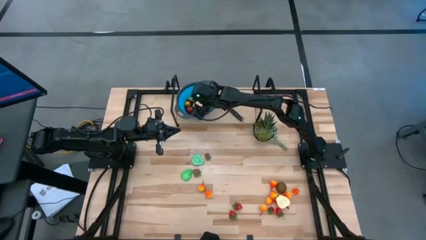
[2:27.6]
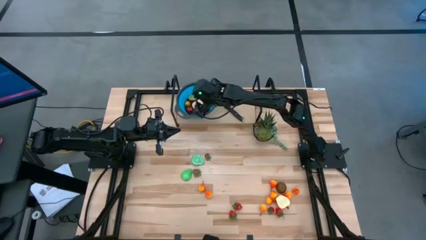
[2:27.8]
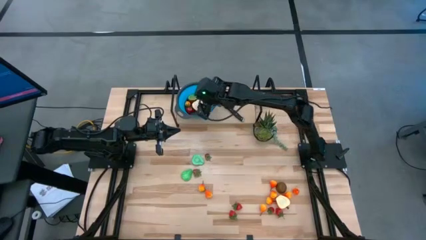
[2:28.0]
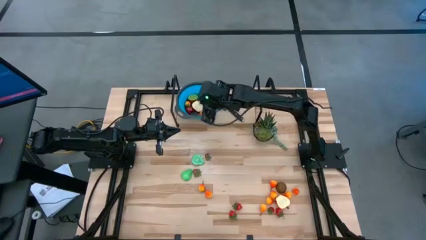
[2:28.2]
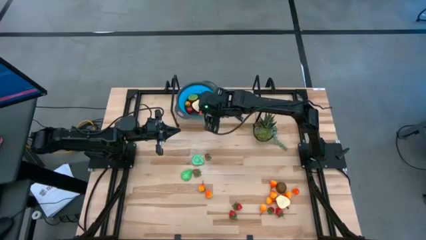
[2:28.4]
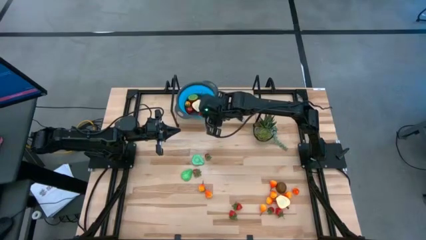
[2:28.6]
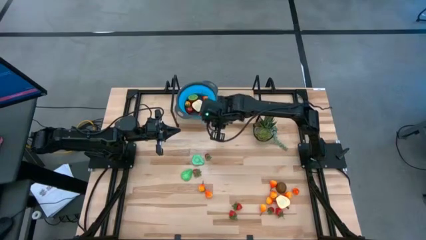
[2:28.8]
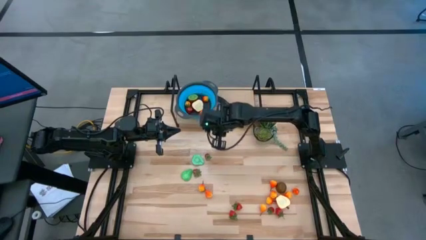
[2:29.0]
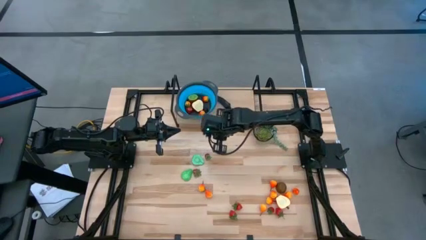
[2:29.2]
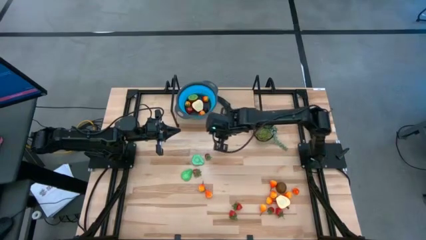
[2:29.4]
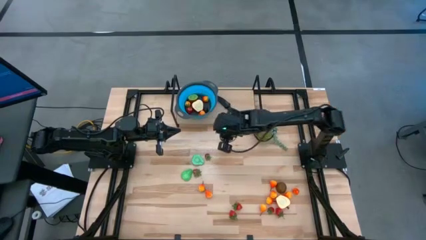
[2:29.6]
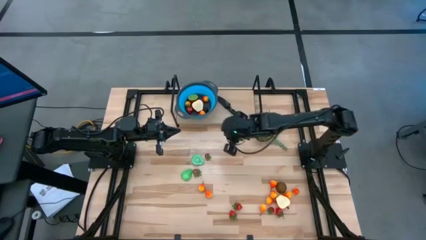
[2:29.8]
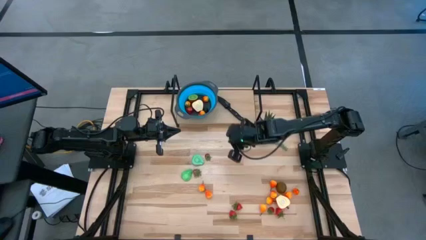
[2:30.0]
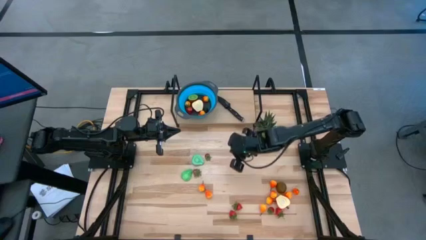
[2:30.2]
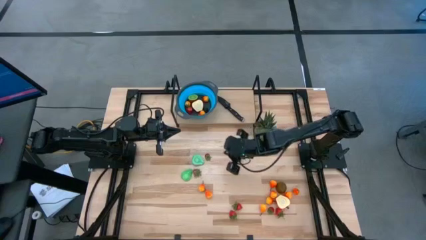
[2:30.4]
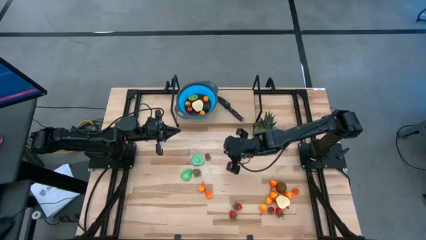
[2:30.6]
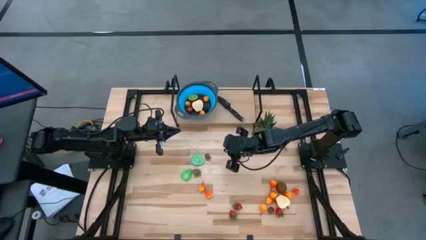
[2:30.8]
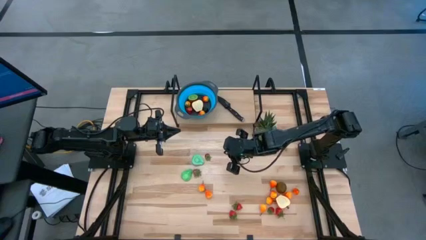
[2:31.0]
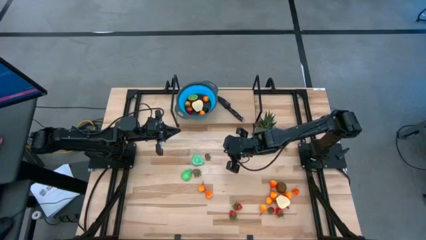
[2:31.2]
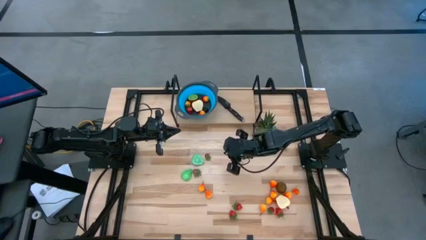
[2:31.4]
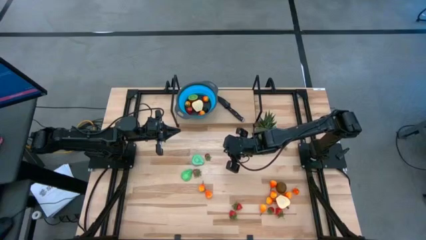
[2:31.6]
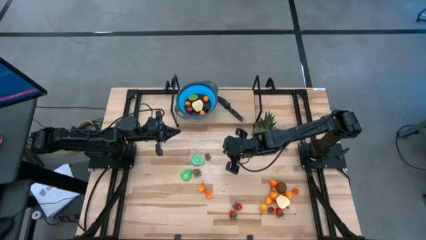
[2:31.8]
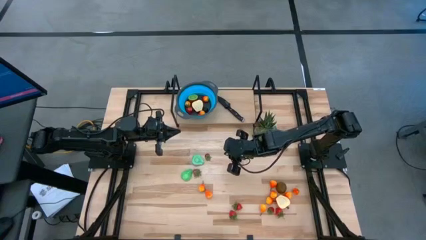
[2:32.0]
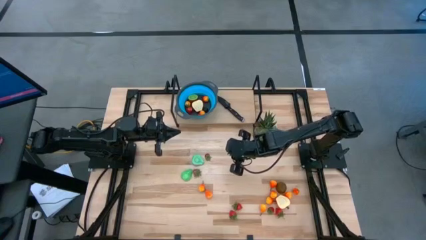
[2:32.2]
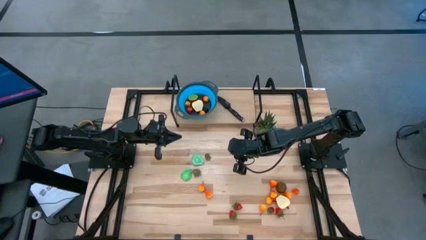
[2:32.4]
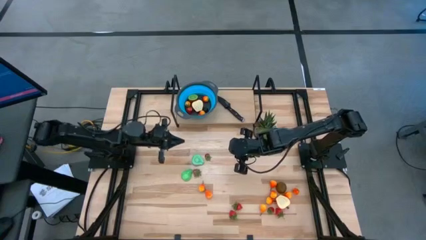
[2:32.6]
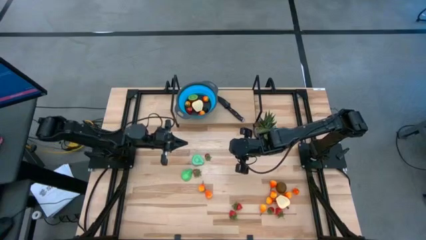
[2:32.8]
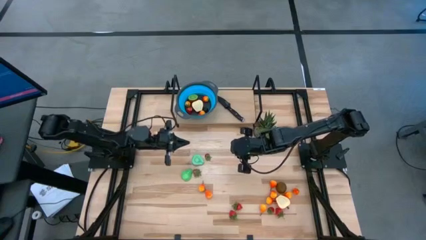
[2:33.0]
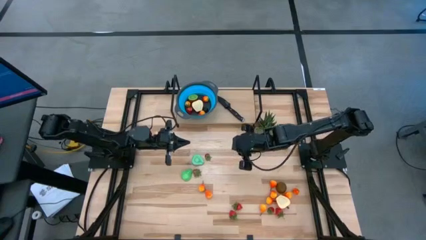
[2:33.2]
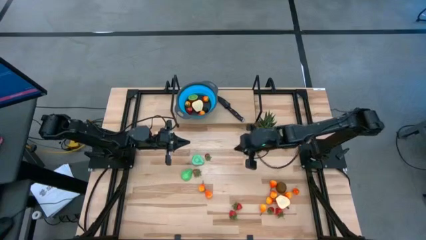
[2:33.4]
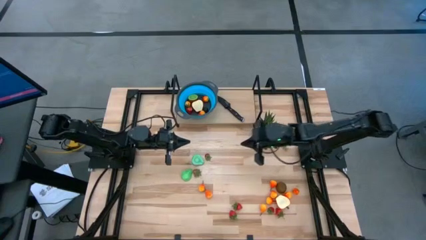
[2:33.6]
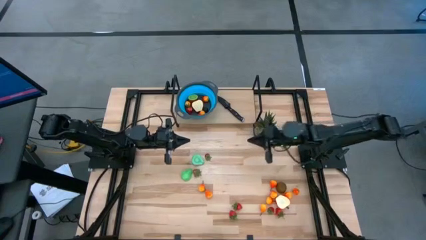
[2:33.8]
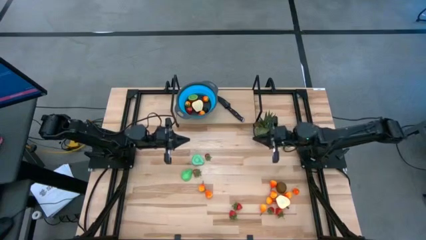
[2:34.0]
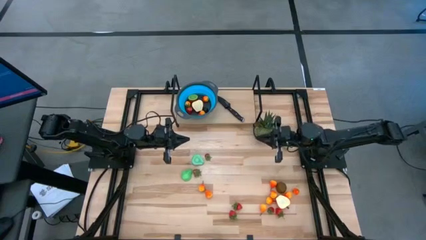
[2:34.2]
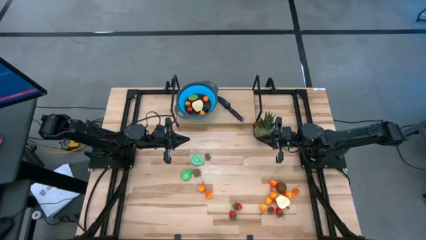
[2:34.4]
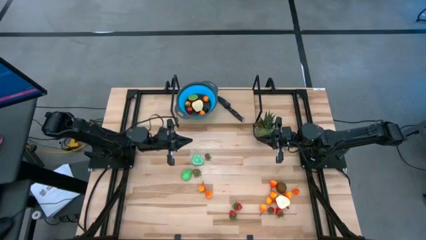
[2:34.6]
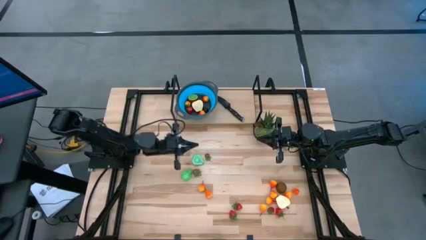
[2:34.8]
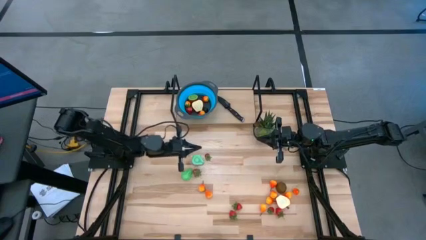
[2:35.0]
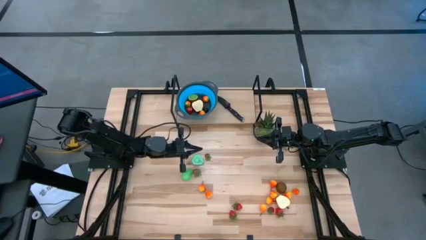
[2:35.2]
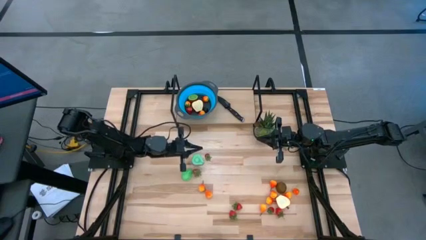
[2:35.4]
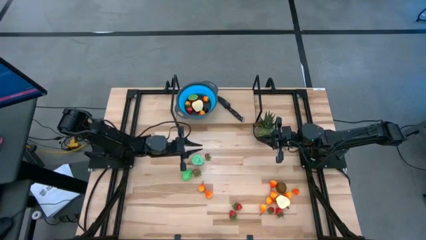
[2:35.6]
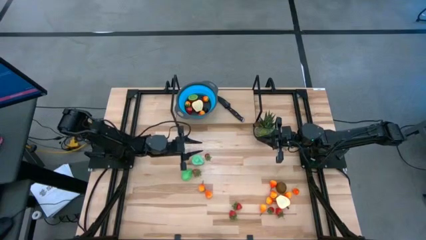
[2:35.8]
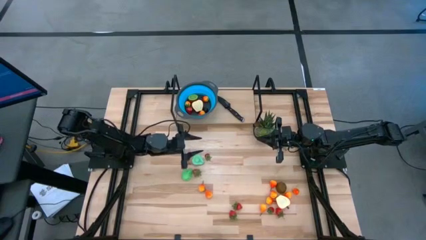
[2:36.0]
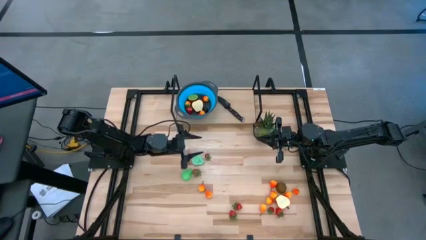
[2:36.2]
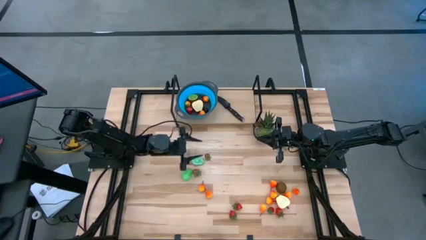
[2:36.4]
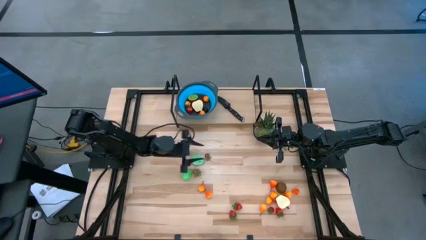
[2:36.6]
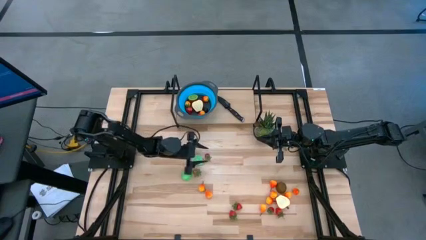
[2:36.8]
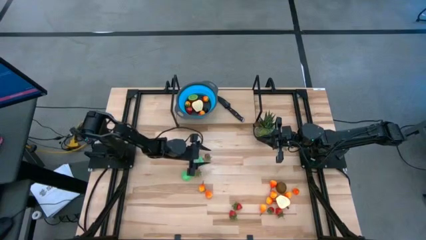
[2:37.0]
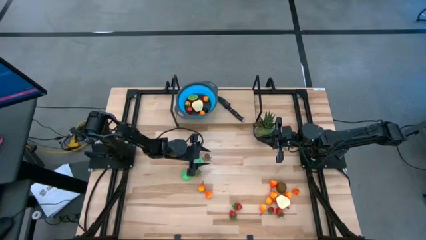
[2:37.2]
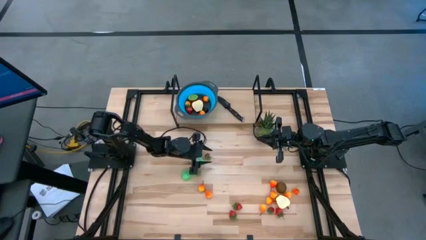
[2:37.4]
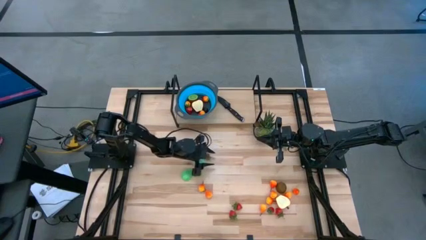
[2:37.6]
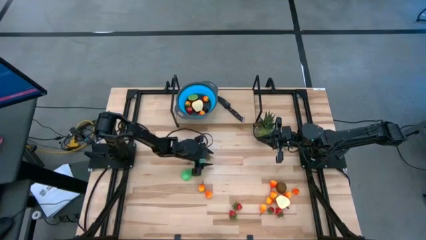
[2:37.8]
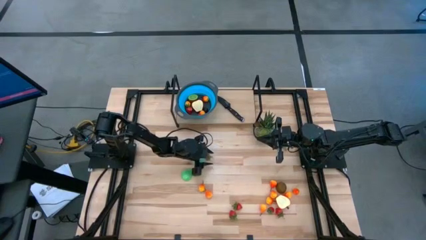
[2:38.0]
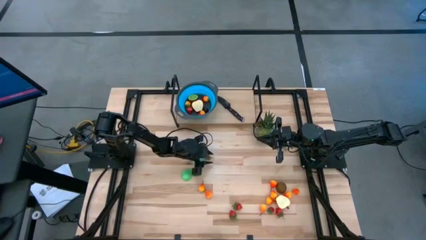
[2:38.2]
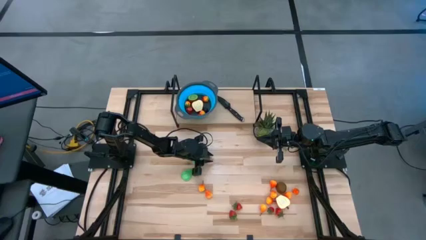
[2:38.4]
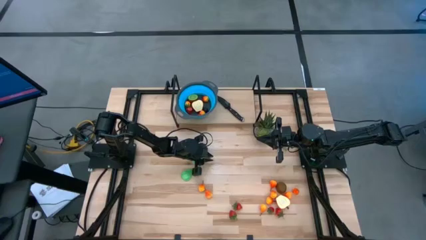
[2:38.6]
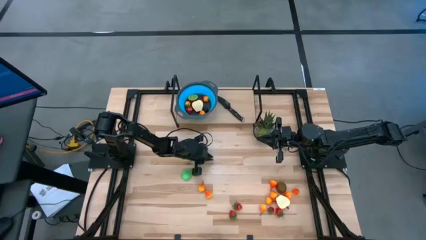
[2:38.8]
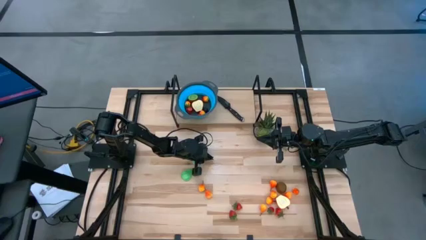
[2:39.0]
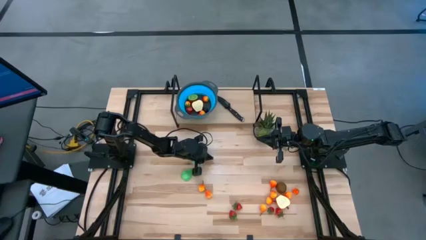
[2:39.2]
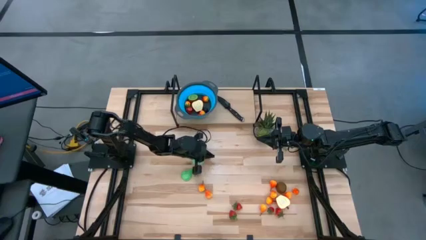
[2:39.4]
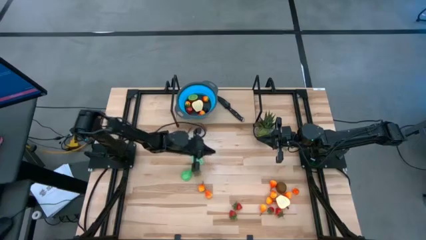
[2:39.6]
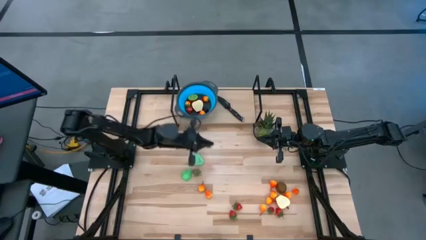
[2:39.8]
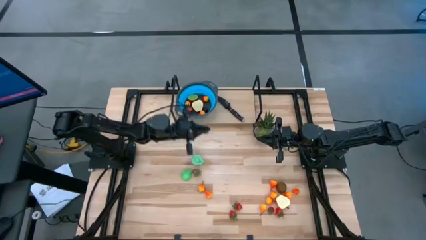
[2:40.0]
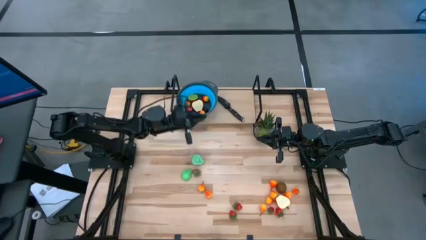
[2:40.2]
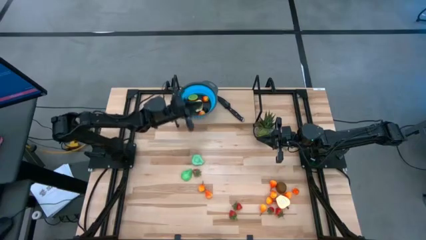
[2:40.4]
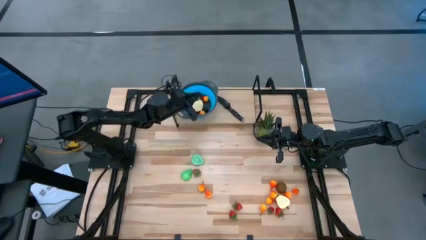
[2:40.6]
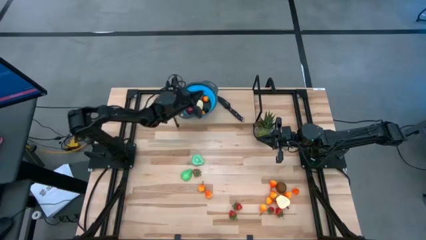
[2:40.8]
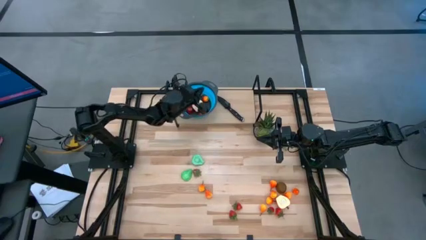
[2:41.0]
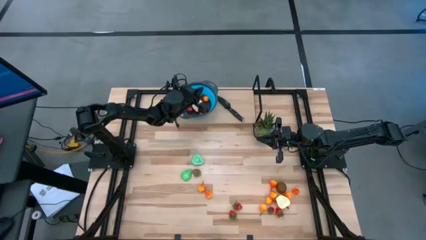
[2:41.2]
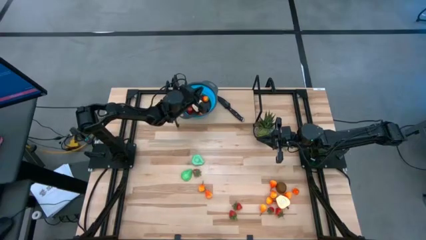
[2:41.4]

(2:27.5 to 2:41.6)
Task: Pick & Place Fruit
Put the strawberry into the basket

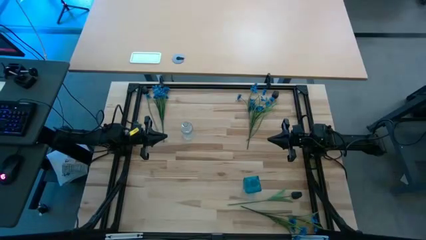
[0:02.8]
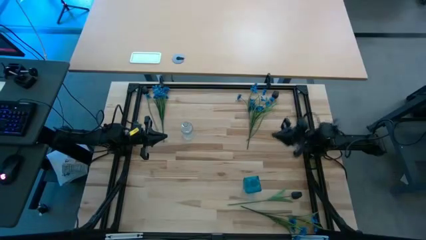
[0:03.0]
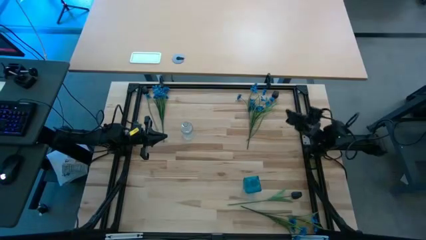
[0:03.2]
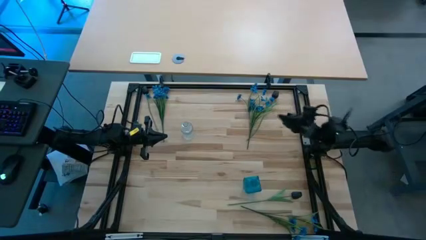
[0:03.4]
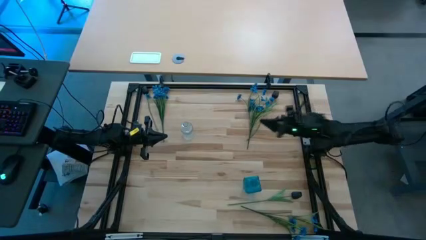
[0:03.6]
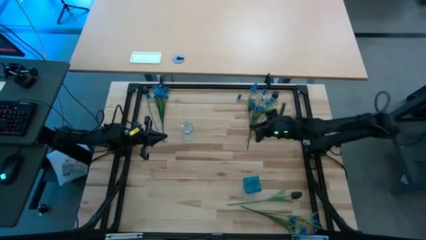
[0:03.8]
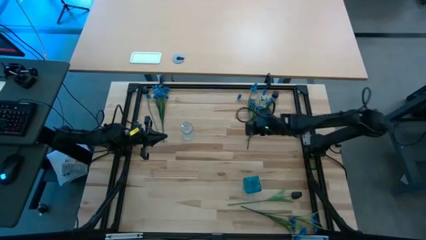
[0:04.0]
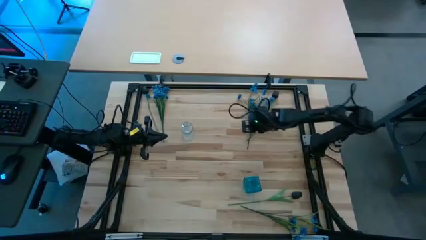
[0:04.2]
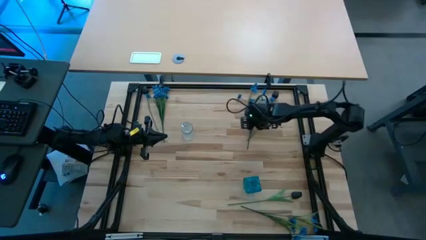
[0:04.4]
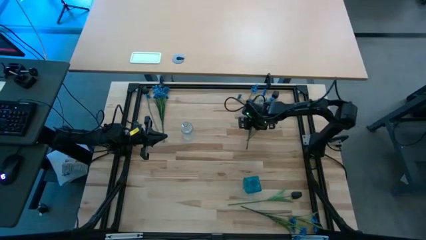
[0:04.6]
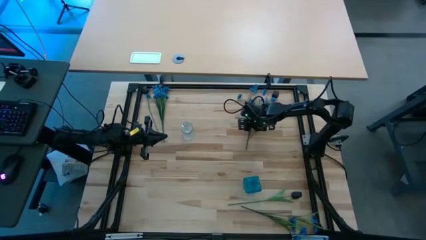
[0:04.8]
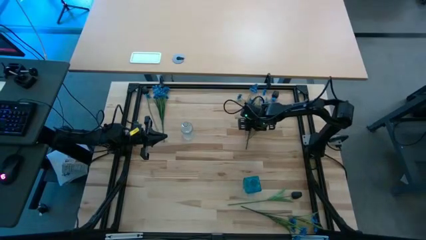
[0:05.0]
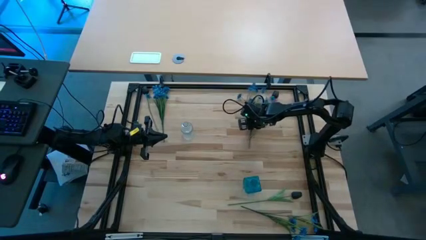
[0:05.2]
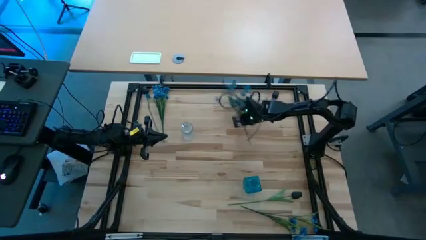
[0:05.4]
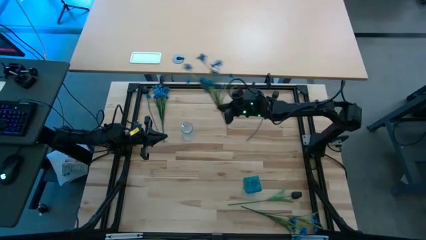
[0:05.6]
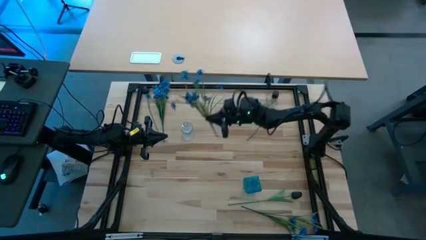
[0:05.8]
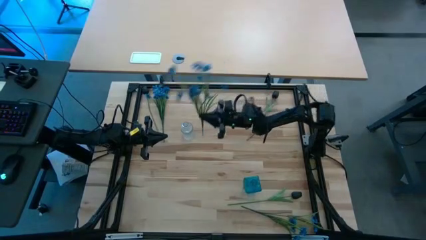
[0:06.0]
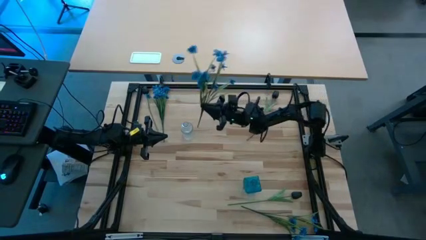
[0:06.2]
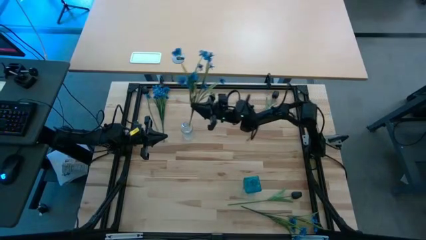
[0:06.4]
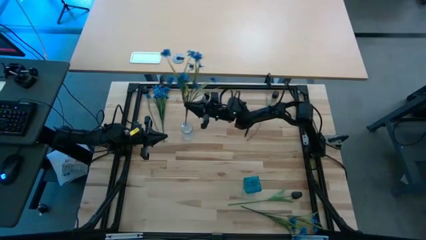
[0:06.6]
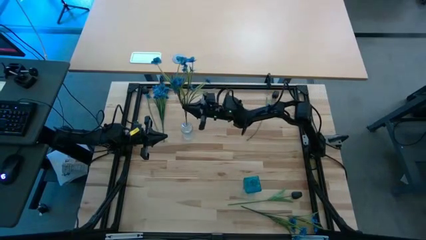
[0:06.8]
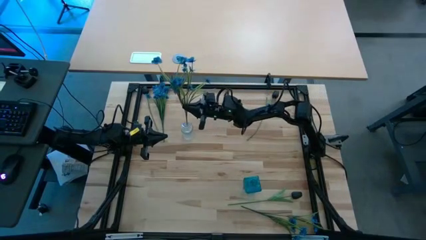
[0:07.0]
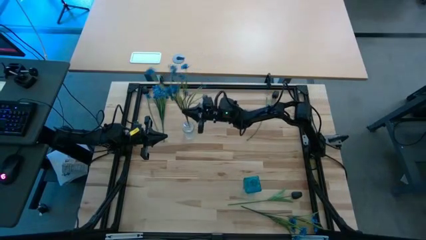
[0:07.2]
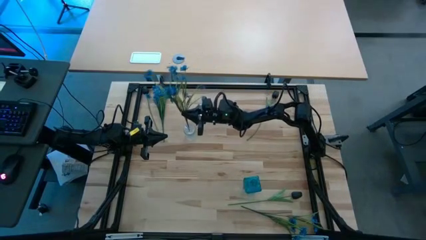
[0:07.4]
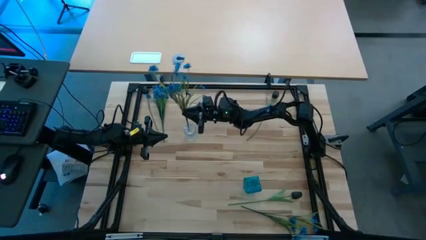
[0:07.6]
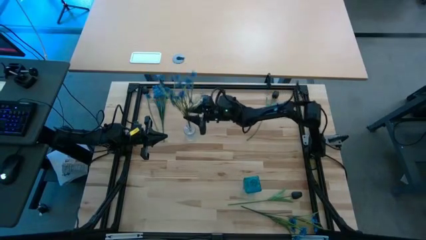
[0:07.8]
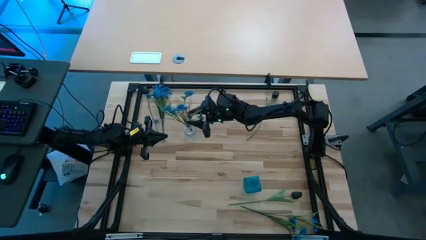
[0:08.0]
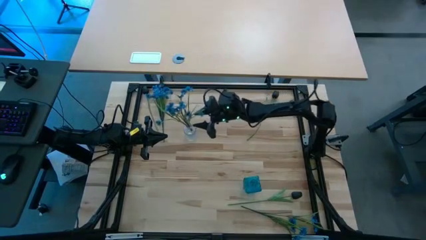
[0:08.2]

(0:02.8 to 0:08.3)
Task: Sort flowers into vase by color
Put the top right light blue flowers into the transparent vase
